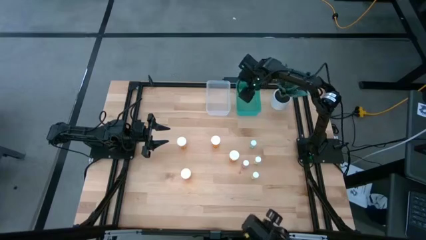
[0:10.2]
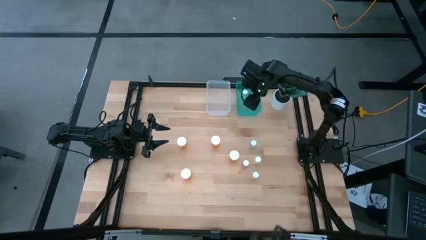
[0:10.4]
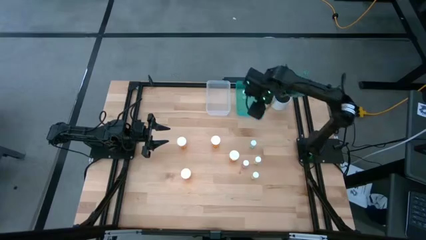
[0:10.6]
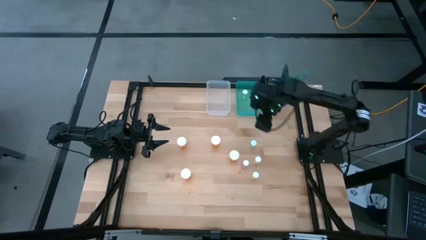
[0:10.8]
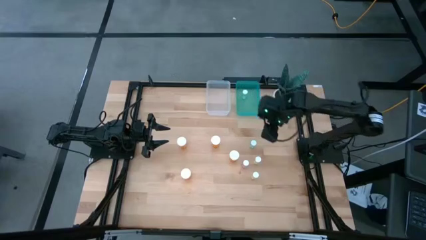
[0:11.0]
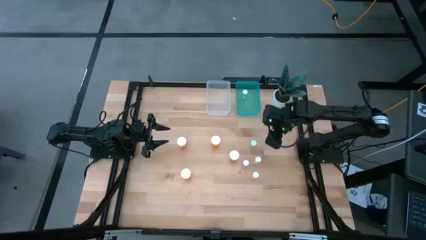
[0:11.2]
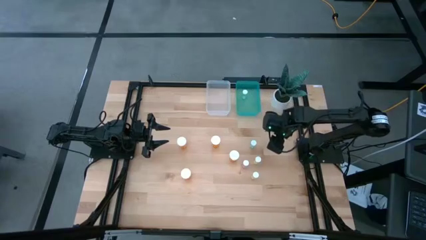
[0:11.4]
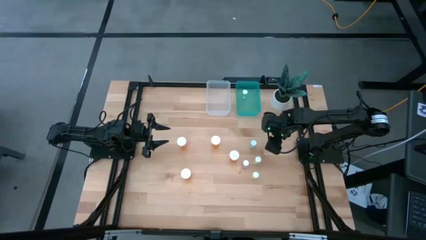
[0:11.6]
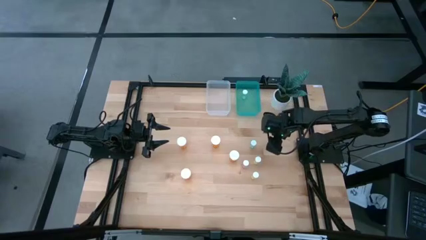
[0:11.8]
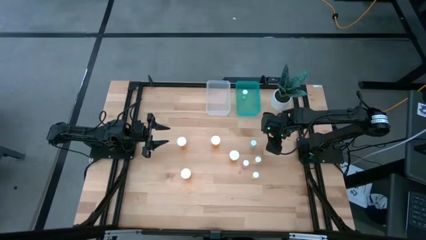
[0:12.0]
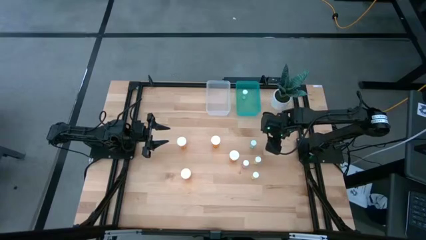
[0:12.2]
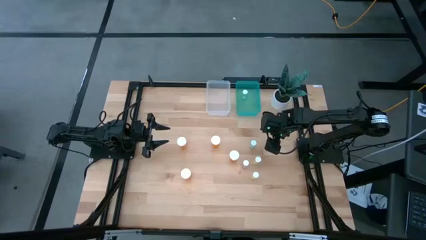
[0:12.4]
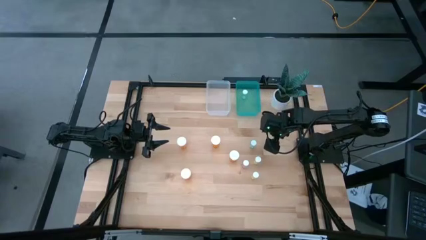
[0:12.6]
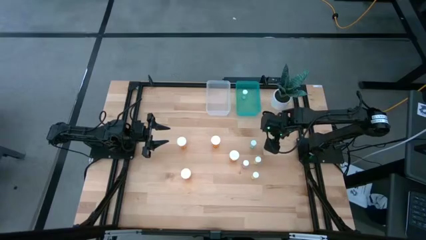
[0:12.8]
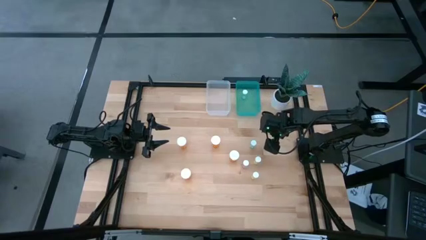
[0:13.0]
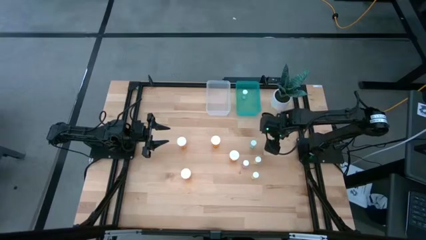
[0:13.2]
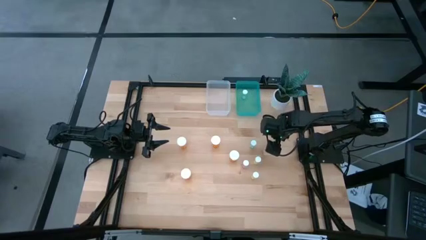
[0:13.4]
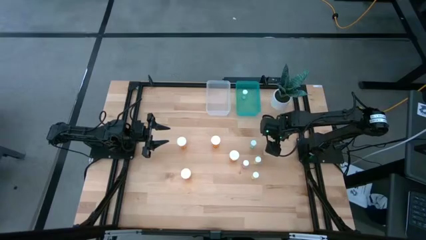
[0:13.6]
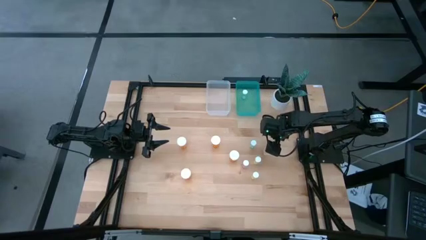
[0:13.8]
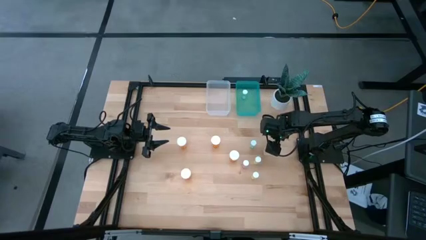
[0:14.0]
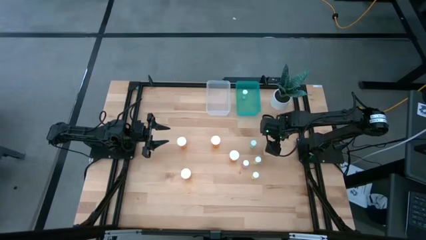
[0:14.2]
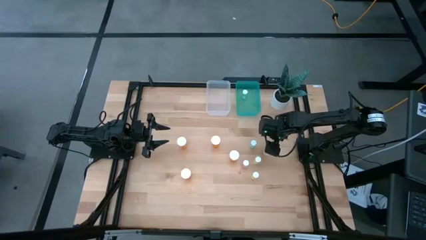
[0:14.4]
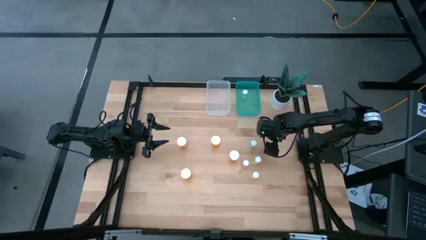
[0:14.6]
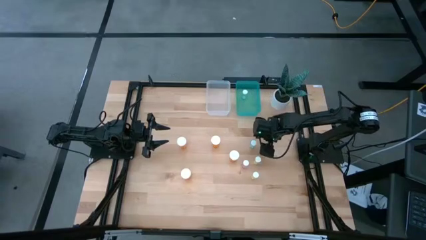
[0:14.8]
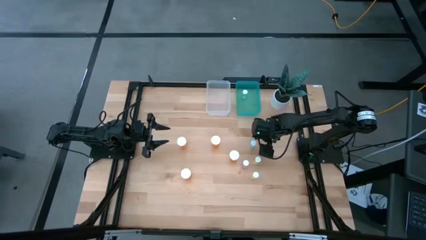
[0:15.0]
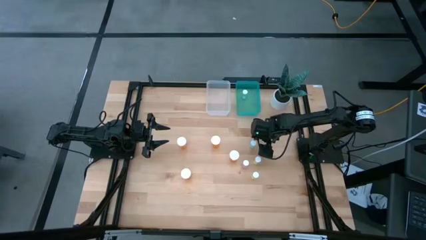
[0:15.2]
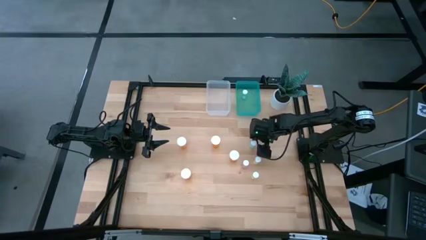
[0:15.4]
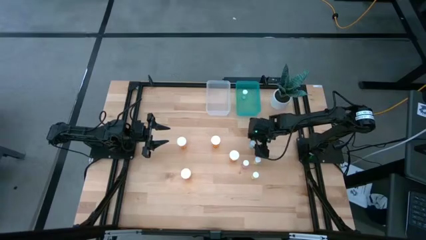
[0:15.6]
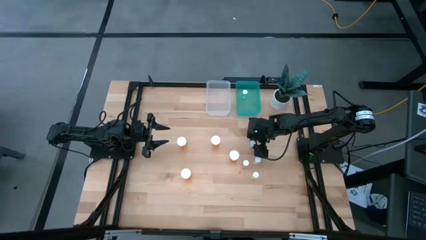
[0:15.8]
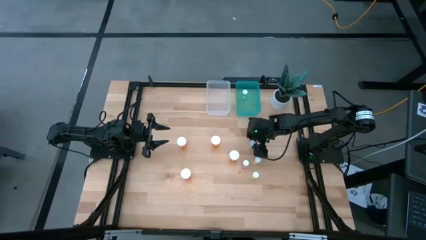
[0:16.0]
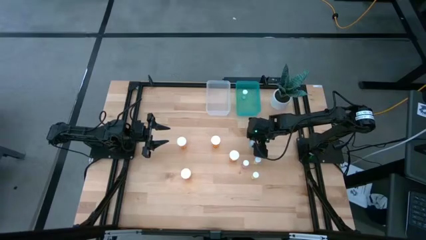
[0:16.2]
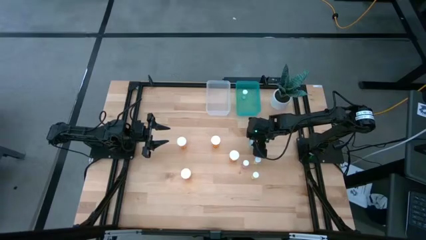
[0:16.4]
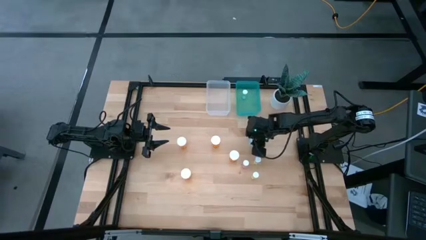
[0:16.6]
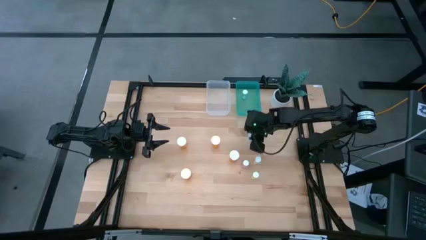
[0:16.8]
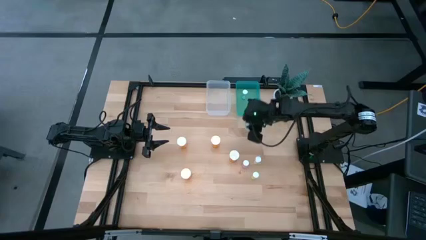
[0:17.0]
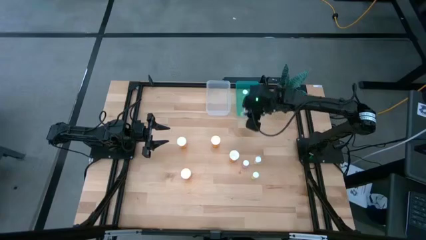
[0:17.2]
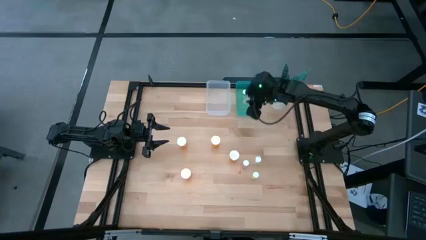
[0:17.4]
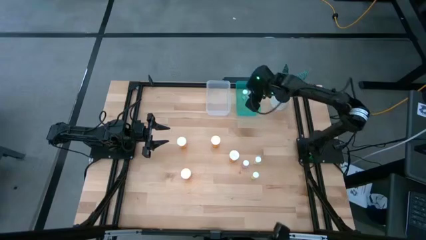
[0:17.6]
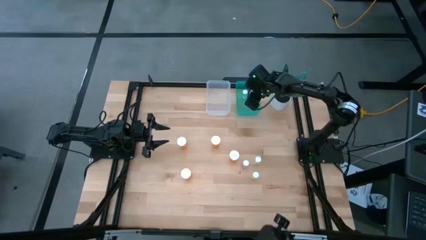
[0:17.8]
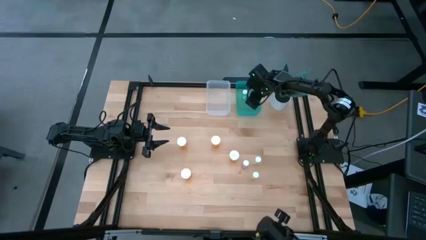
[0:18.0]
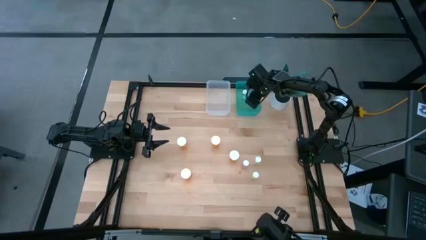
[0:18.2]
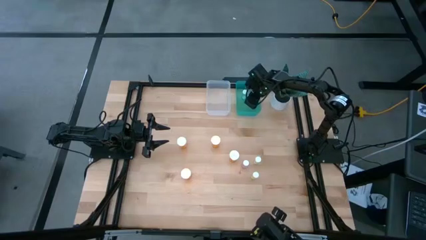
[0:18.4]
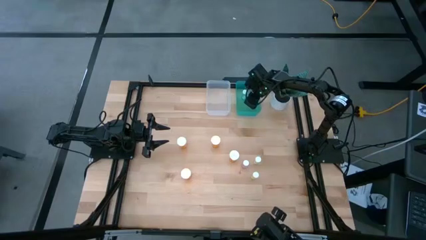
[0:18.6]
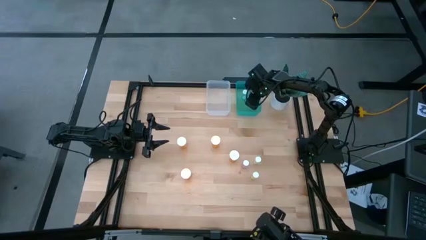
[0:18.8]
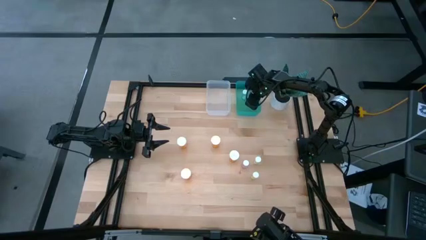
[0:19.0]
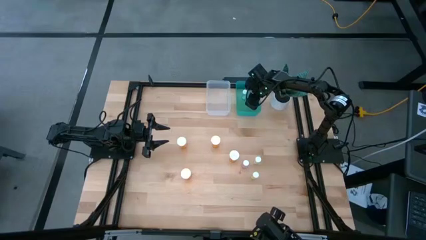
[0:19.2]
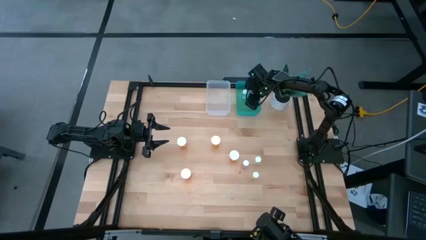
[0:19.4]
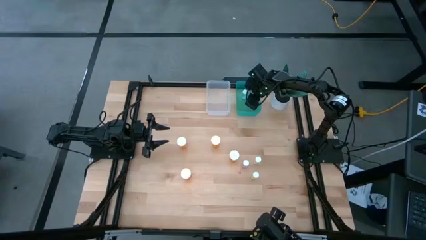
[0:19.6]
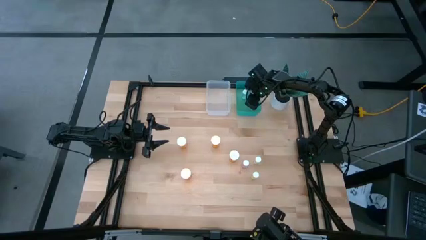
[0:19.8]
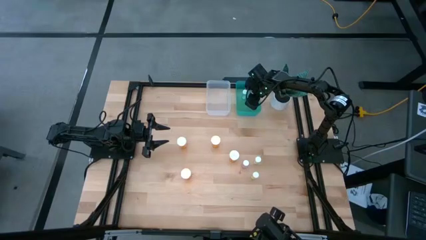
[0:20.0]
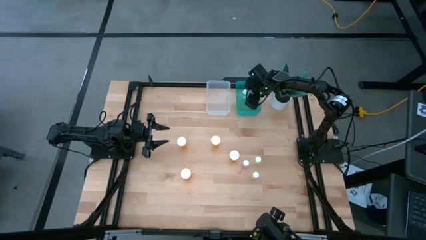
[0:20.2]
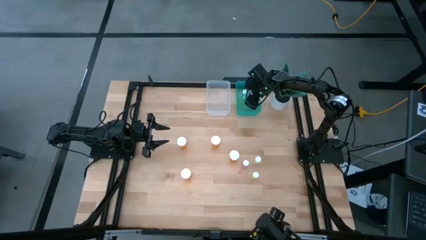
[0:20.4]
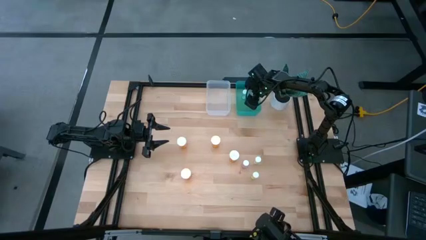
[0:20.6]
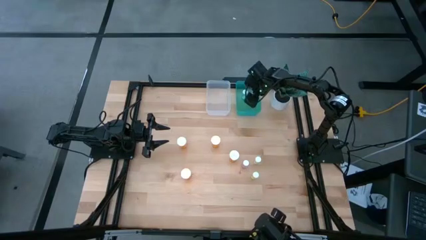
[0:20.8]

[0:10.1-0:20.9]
Task: Pick and place medicine bottles into bin by pill shape (circle, oval)
Put the small blue pill bottle into the blue bin

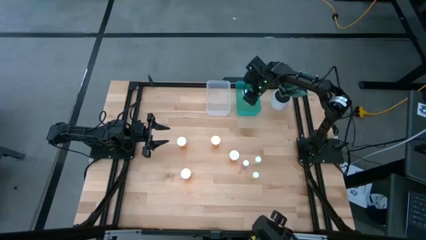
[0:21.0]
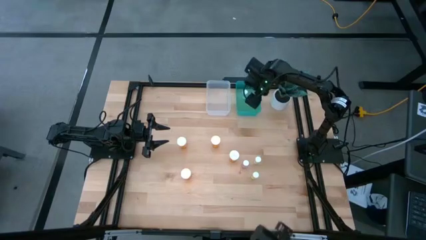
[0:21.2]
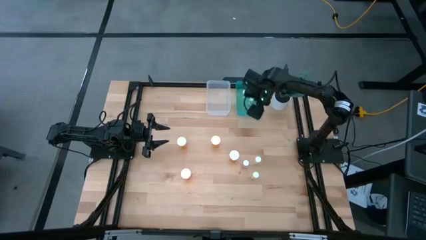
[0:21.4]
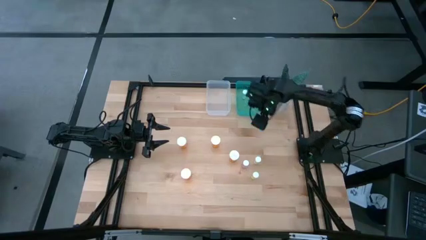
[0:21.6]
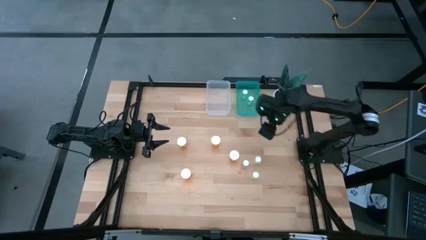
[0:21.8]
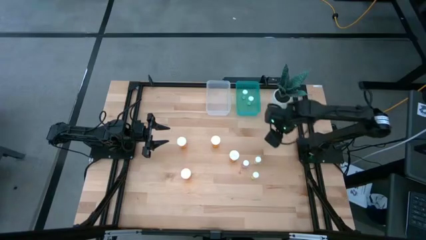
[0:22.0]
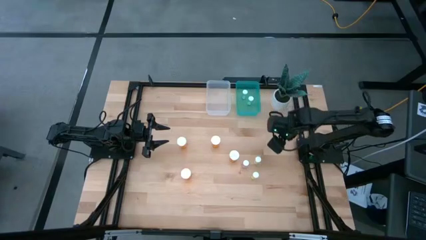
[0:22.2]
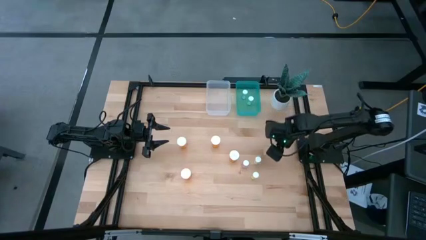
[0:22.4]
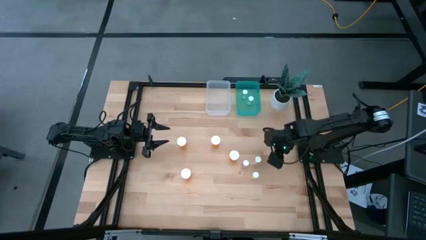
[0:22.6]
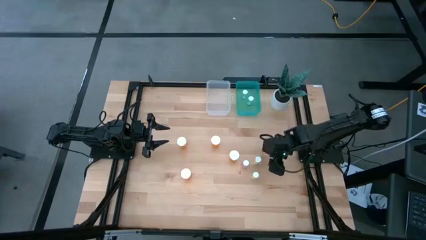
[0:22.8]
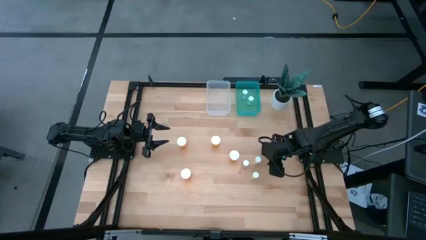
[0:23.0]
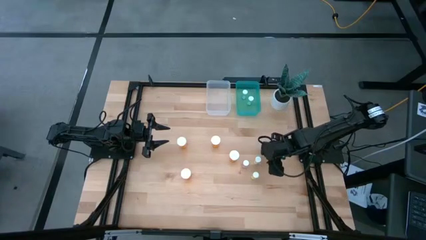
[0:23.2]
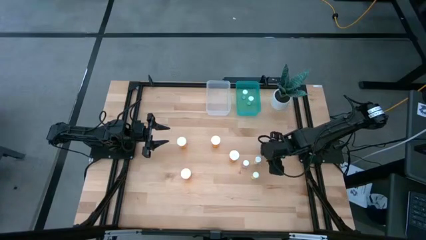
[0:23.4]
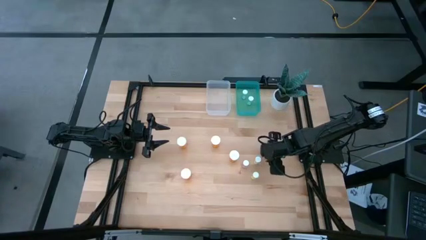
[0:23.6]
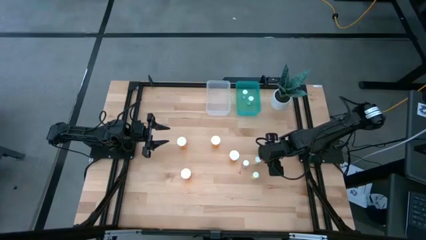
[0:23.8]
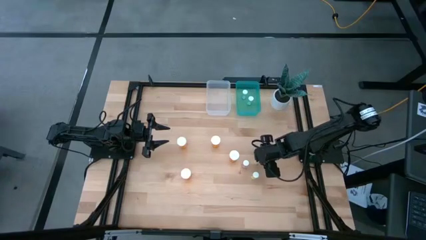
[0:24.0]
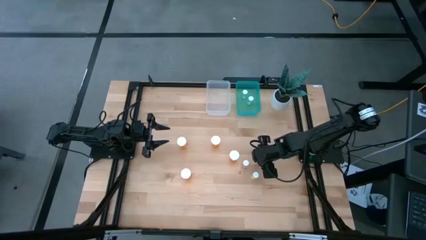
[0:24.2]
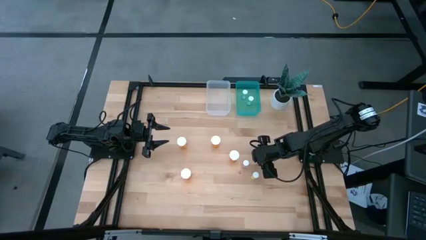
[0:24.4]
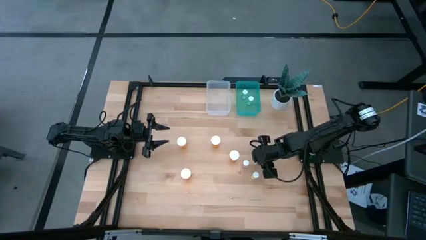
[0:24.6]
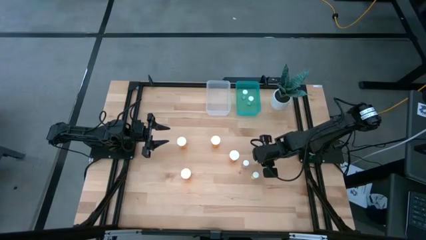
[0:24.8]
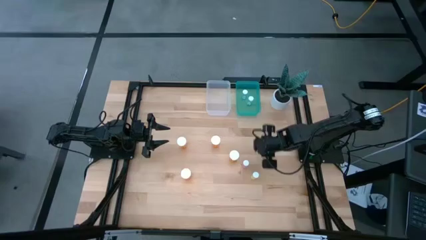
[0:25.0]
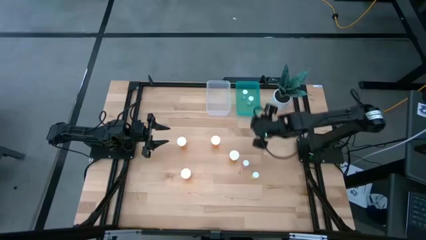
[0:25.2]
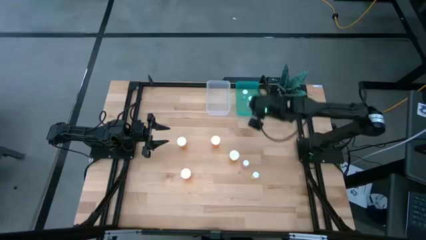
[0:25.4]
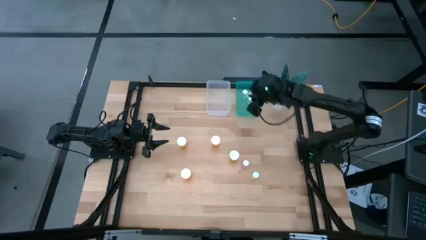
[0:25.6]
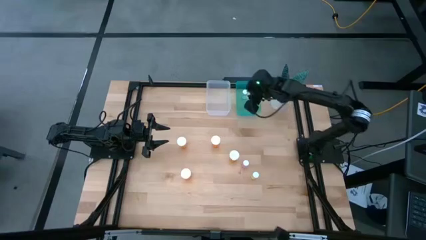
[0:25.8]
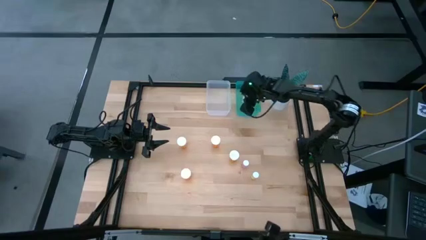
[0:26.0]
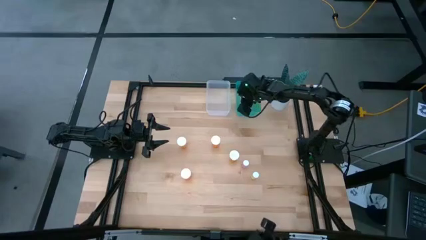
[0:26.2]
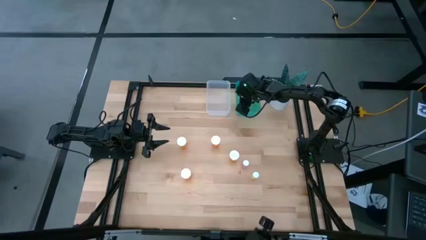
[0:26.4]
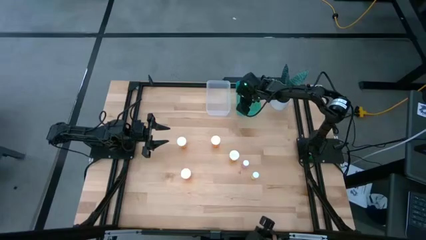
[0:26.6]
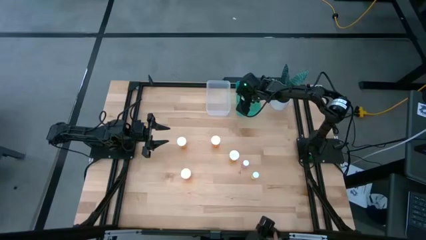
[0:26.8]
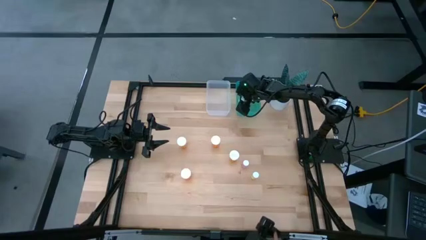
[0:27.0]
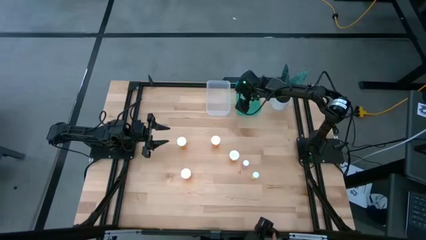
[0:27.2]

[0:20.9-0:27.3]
Put the small yellow pill bottle into the blue bin
